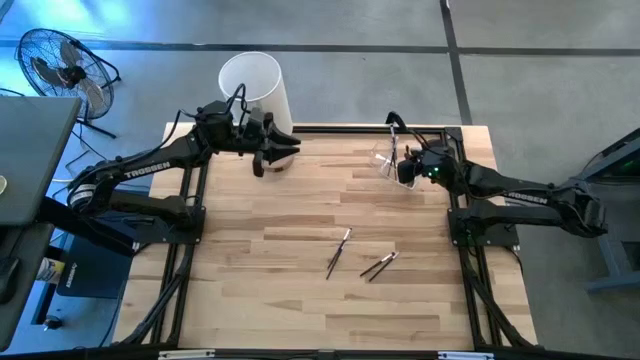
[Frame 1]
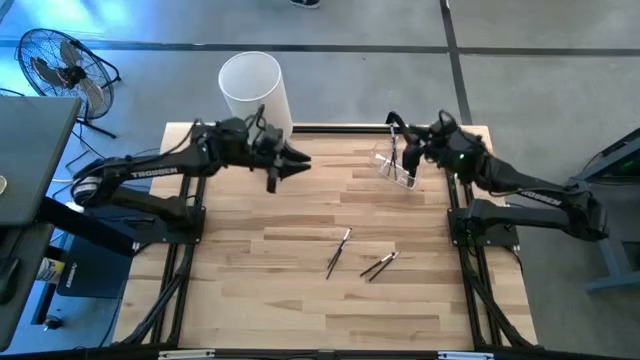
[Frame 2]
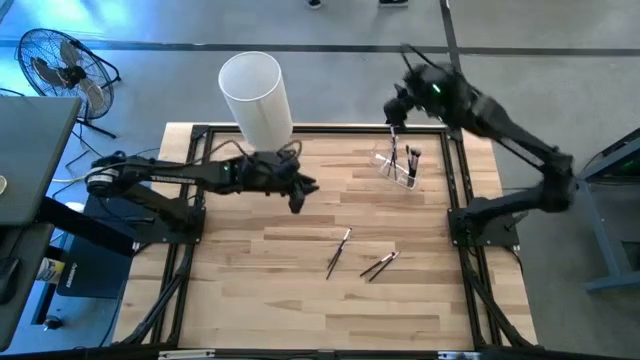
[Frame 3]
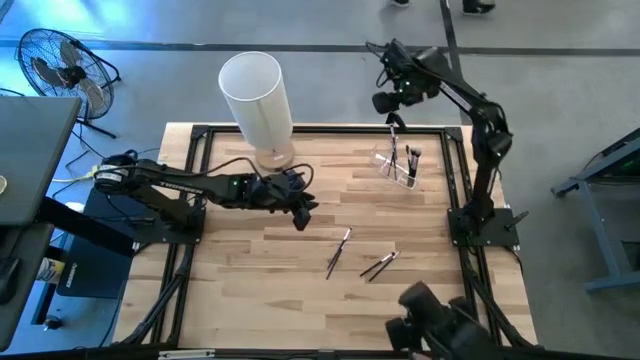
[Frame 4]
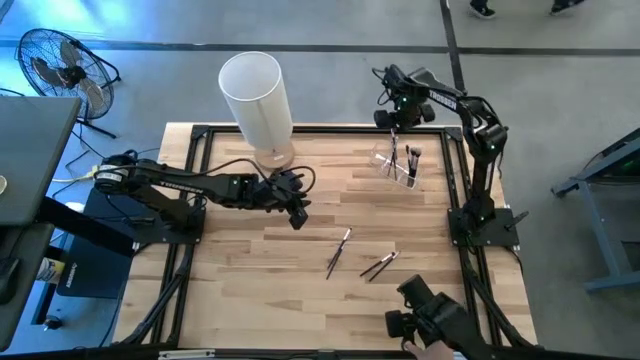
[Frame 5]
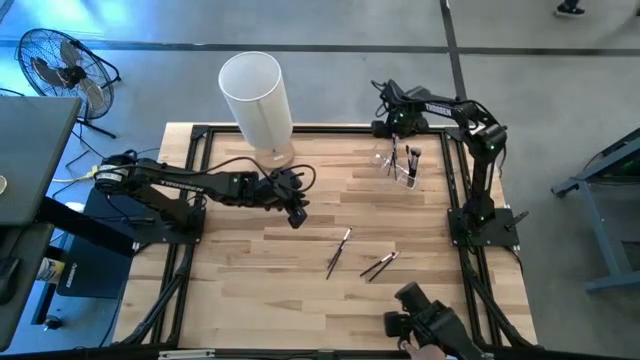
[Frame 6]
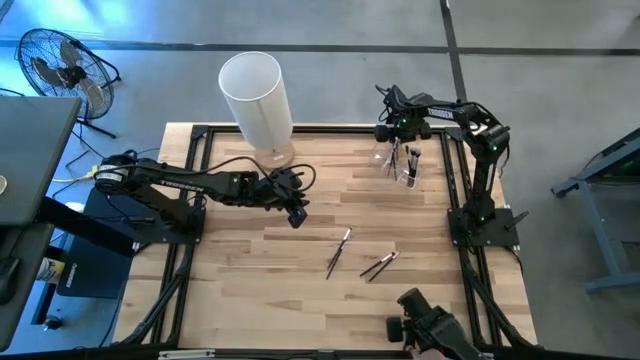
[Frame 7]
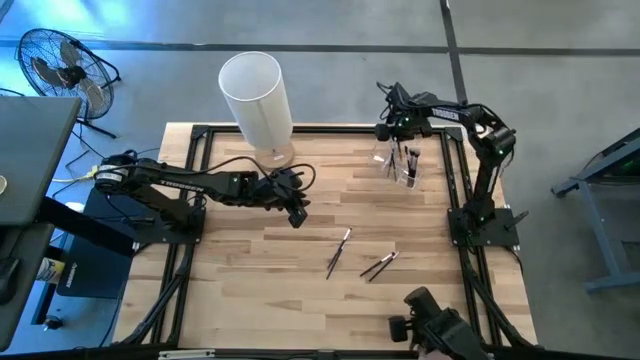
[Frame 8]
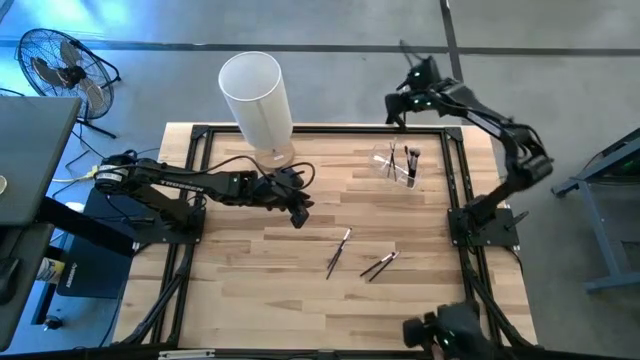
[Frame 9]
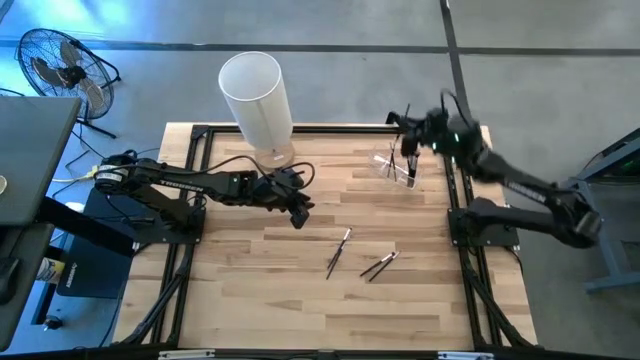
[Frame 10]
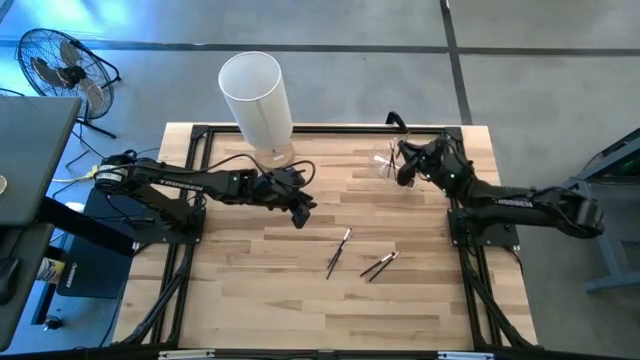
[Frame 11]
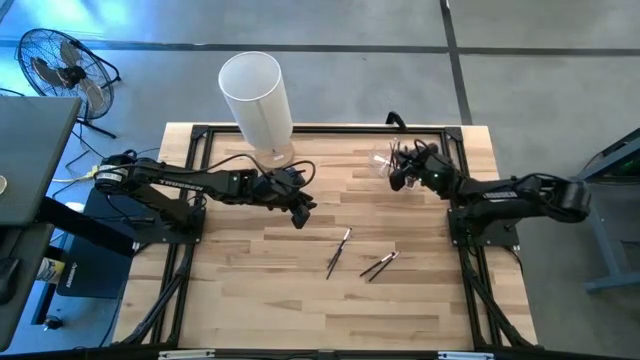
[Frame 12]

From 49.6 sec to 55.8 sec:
Task: Put items in baskets/containers
Put the blush brush into the transparent organizer

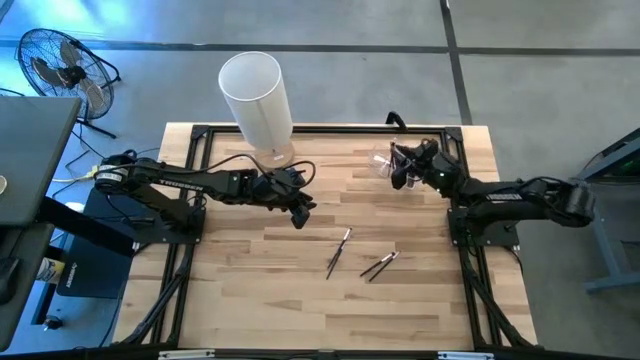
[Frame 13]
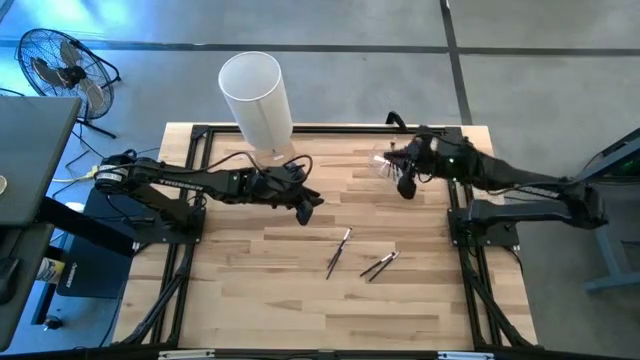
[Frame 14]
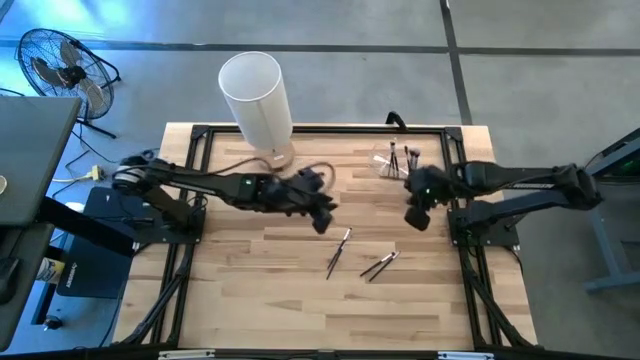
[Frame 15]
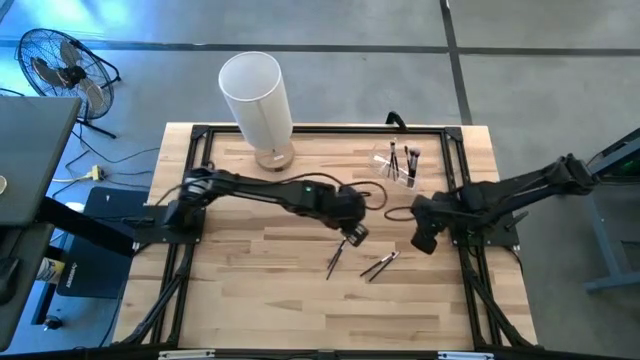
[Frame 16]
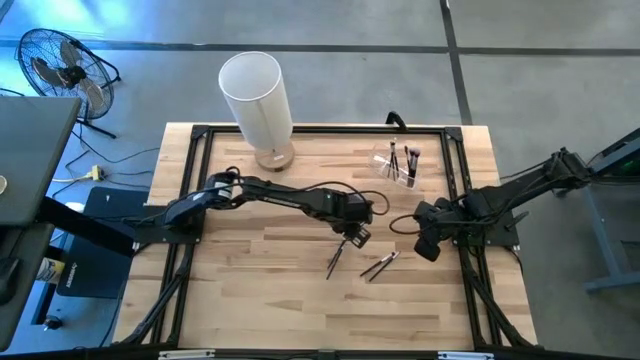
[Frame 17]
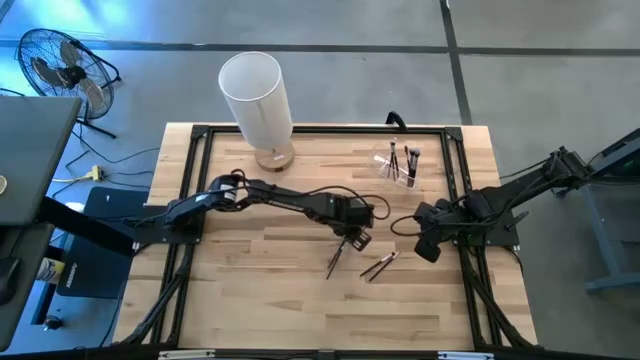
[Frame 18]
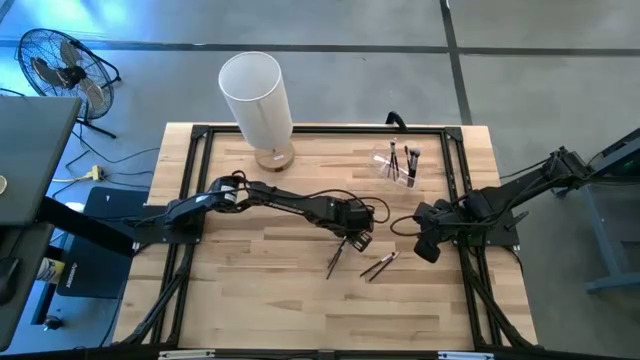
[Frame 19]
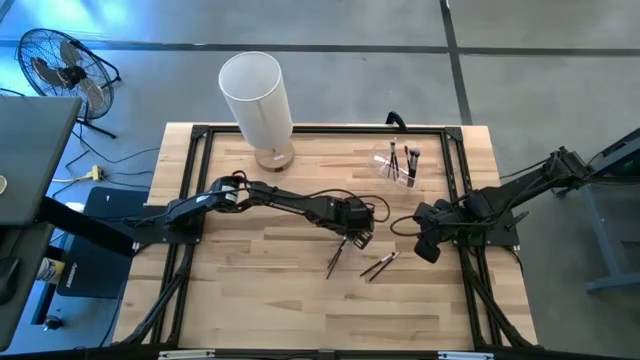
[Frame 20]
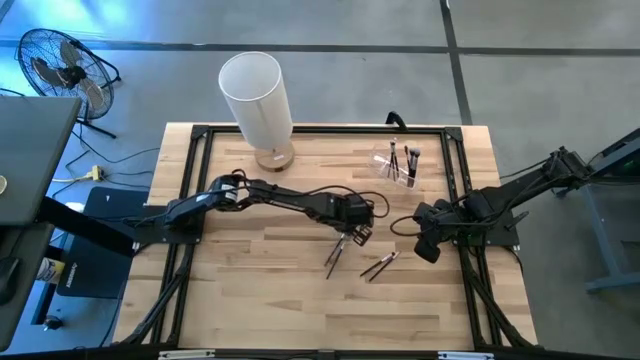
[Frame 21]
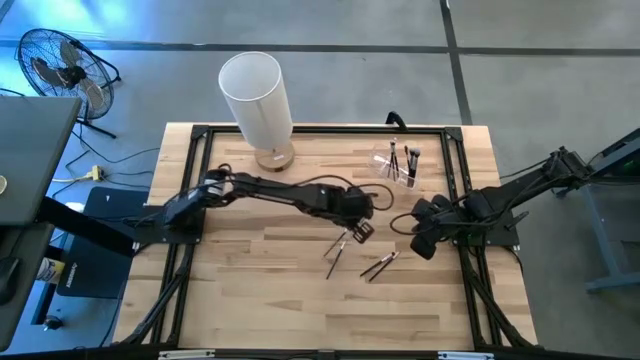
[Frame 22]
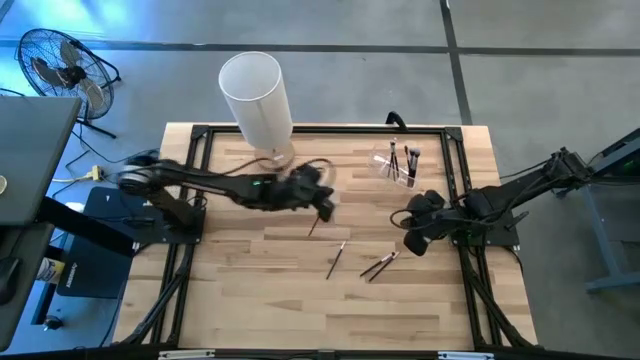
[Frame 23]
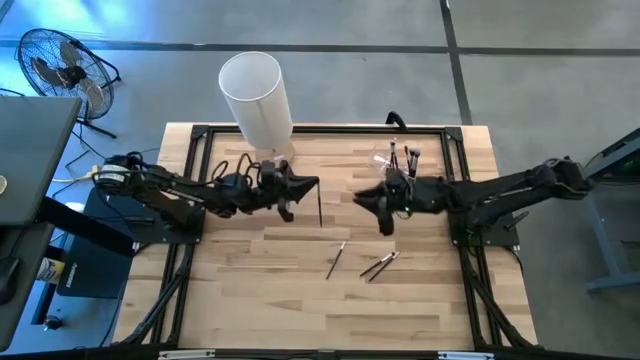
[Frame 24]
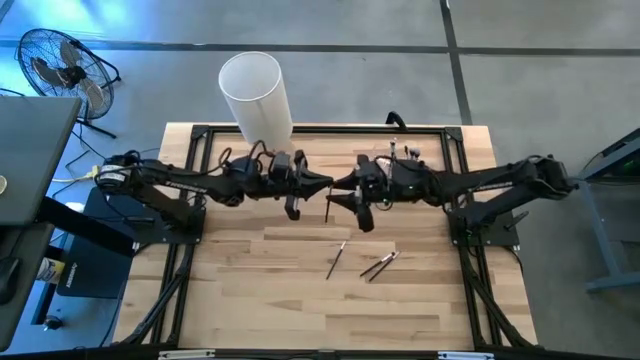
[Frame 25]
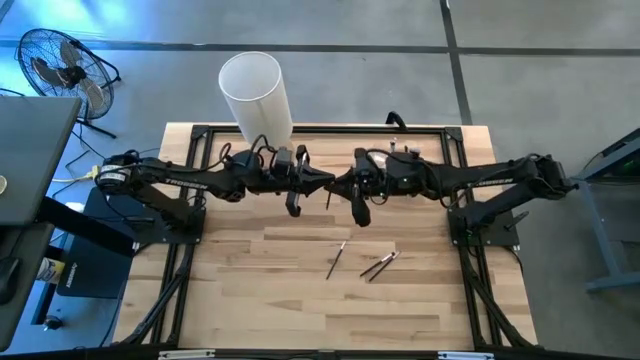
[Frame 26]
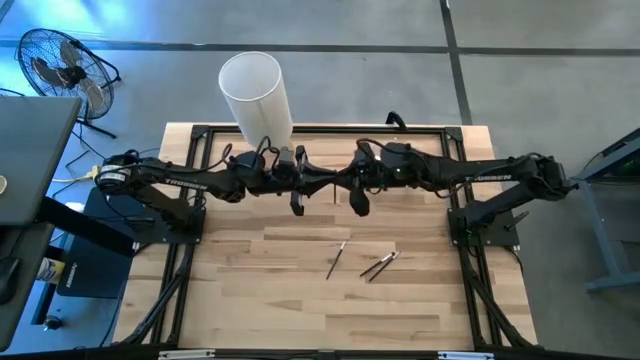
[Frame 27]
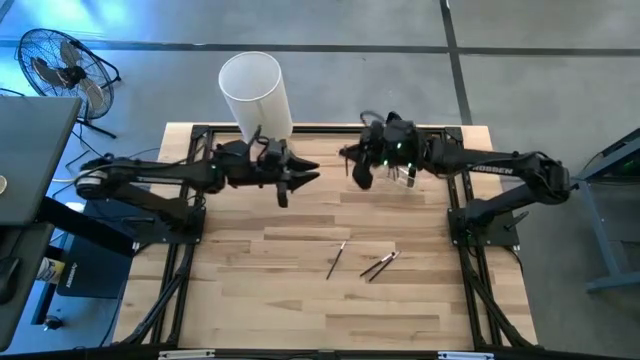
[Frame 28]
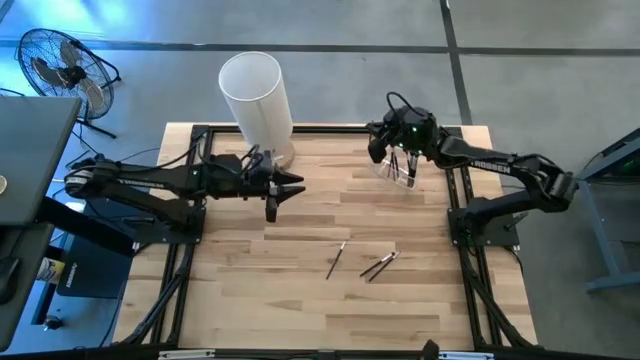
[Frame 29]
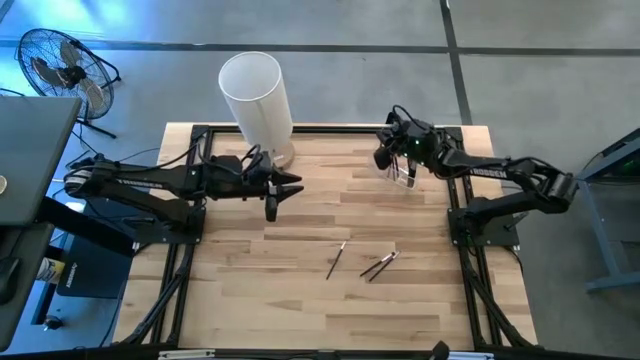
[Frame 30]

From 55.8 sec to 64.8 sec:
Put the eyeshadow brush into the transparent organizer

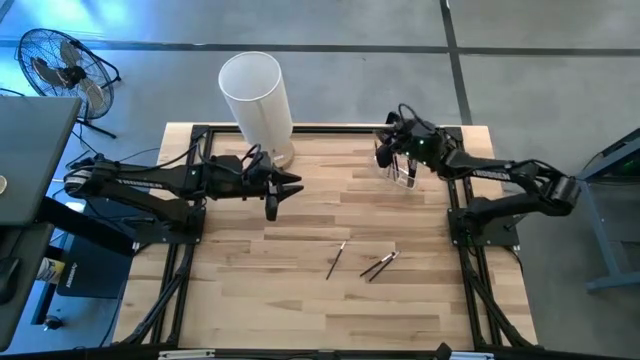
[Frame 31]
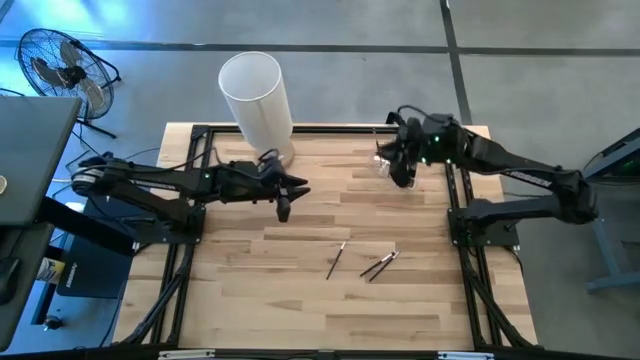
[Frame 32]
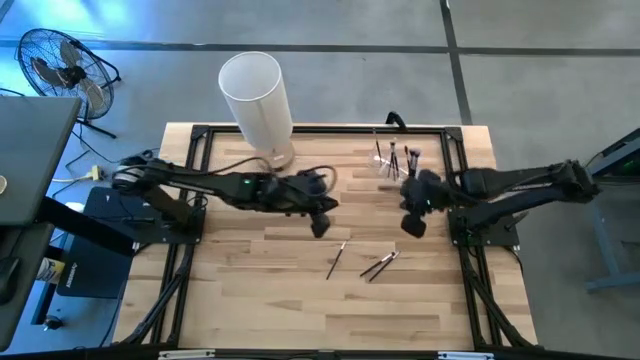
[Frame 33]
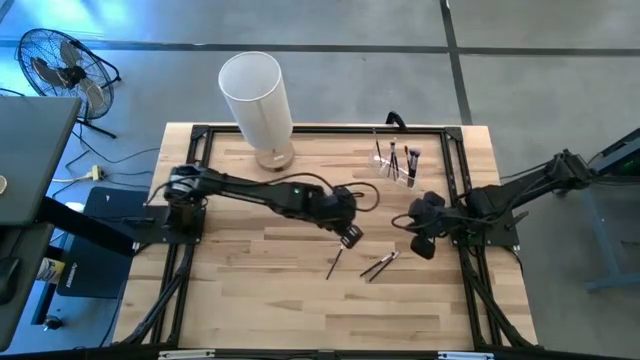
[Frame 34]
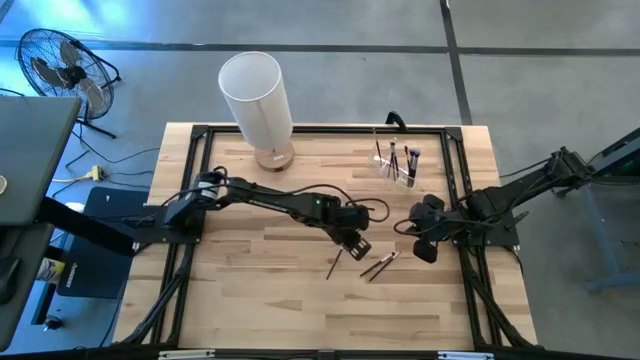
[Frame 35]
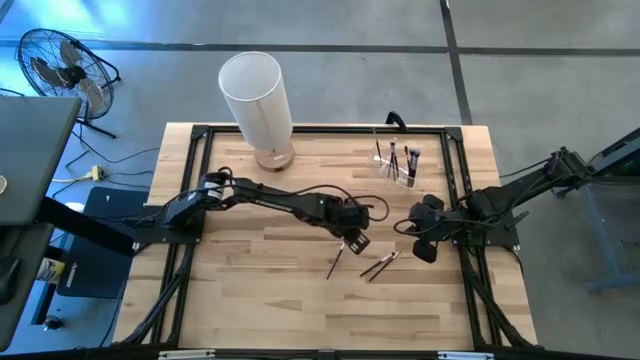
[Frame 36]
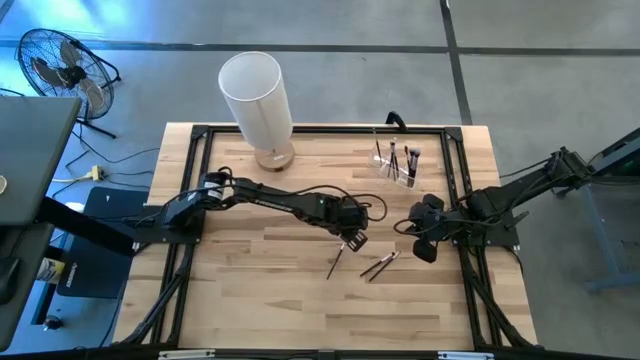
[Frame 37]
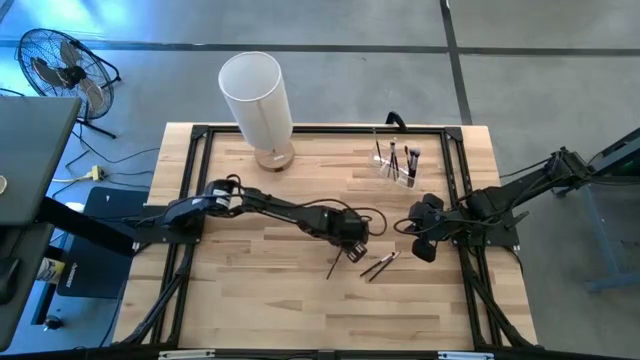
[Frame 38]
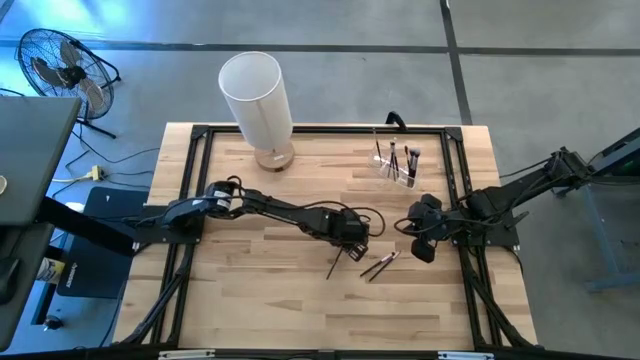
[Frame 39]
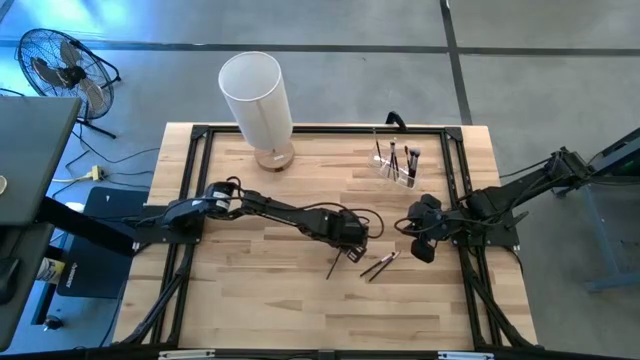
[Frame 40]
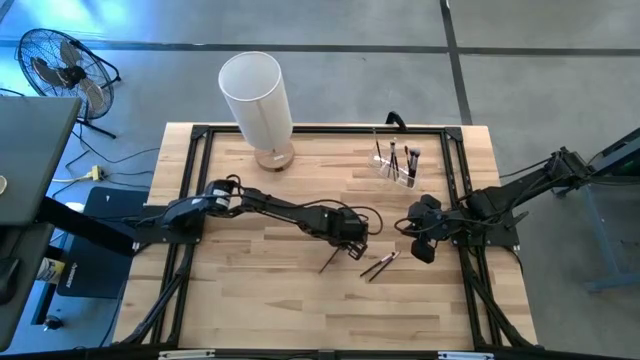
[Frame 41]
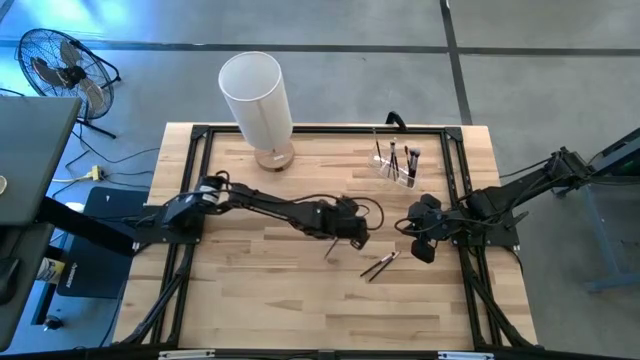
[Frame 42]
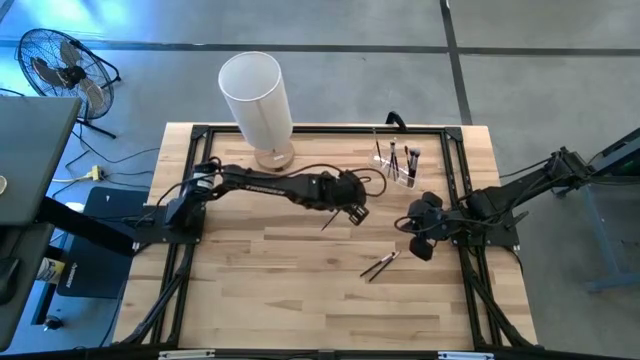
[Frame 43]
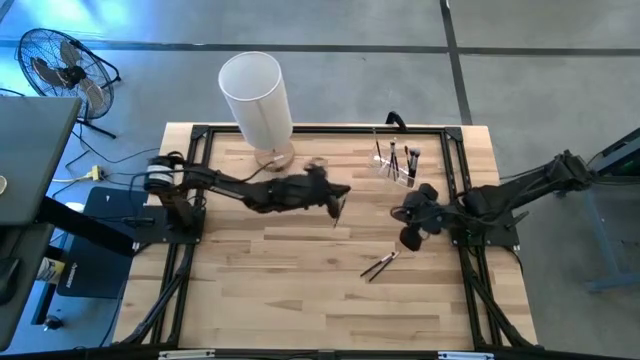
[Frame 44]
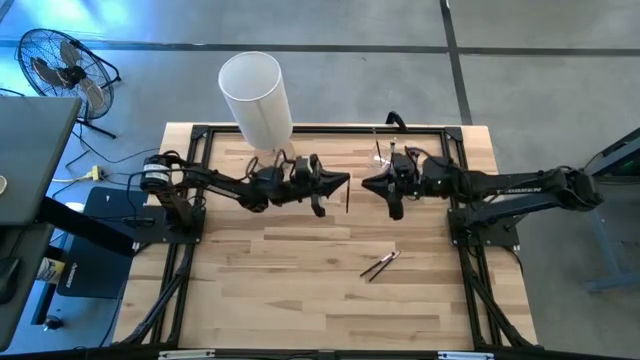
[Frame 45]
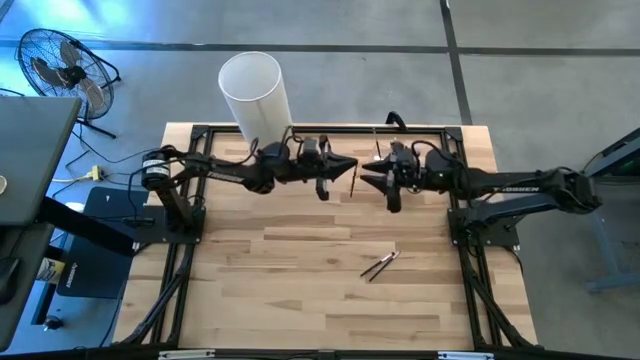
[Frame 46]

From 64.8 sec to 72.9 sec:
Put the eyeshadow brush into the transparent organizer
